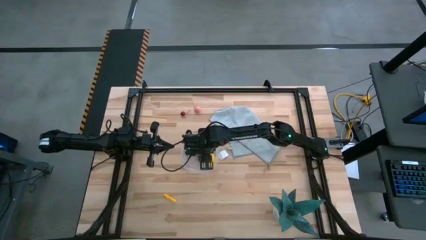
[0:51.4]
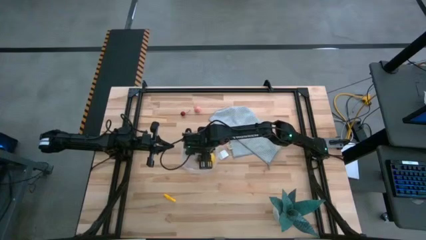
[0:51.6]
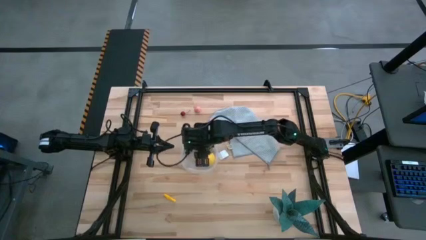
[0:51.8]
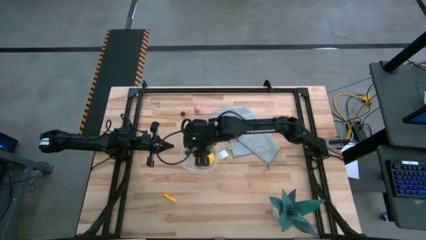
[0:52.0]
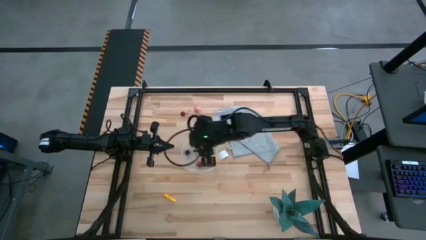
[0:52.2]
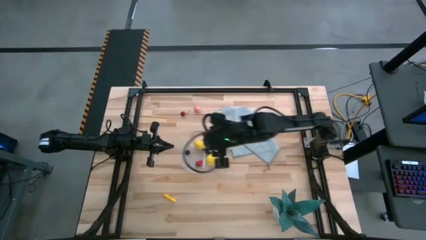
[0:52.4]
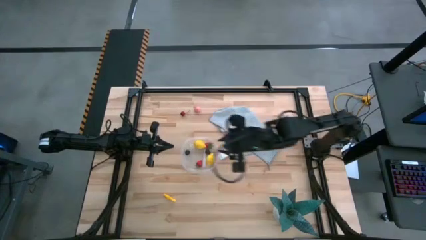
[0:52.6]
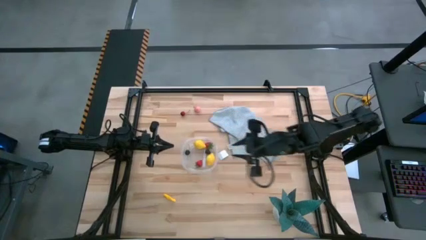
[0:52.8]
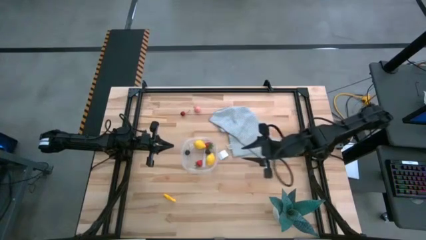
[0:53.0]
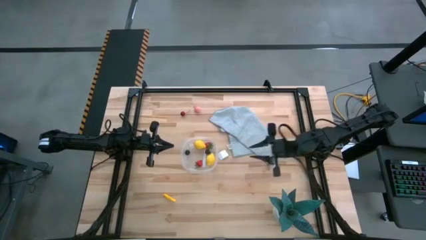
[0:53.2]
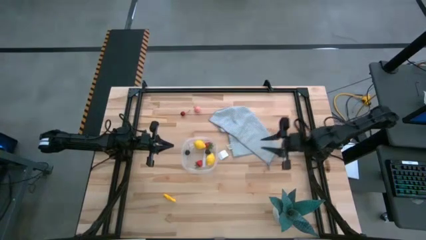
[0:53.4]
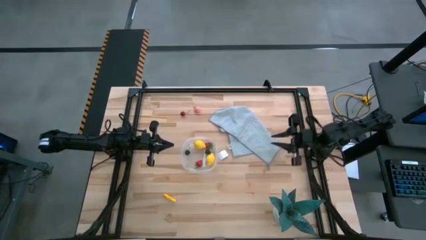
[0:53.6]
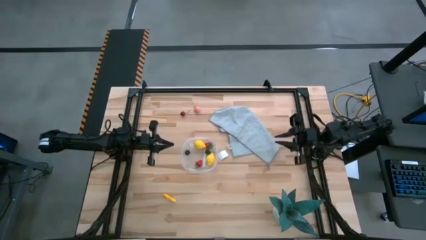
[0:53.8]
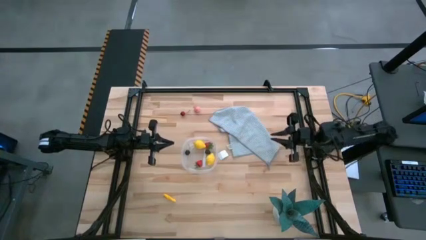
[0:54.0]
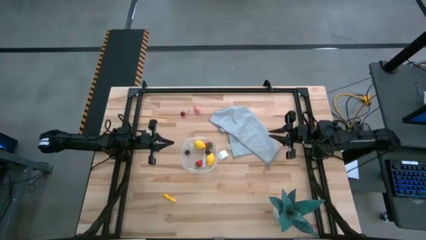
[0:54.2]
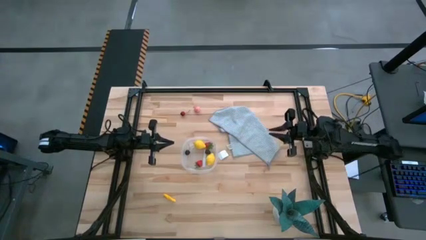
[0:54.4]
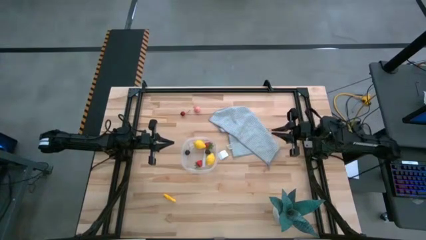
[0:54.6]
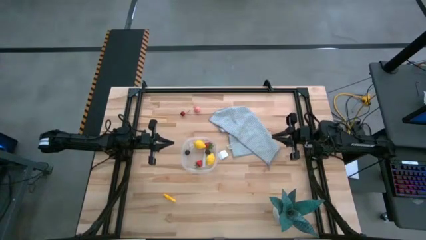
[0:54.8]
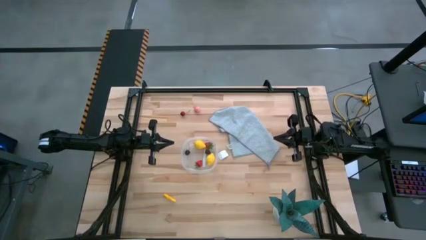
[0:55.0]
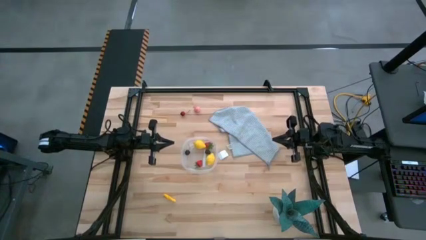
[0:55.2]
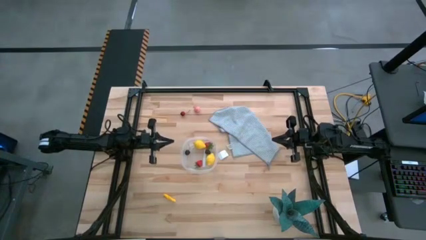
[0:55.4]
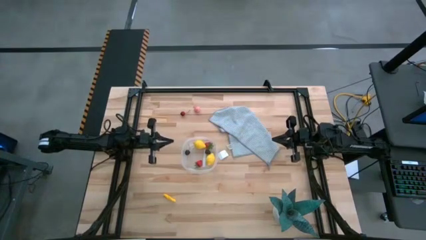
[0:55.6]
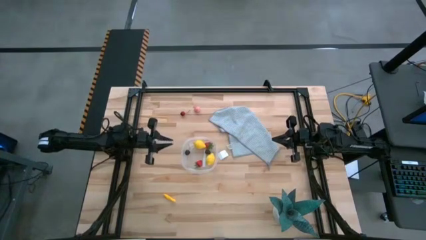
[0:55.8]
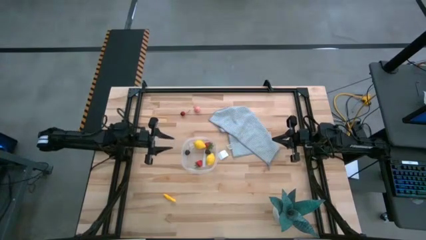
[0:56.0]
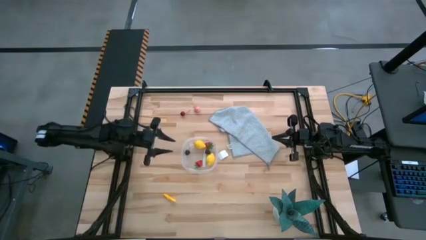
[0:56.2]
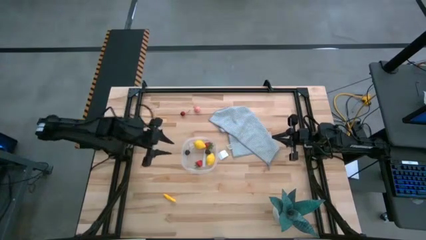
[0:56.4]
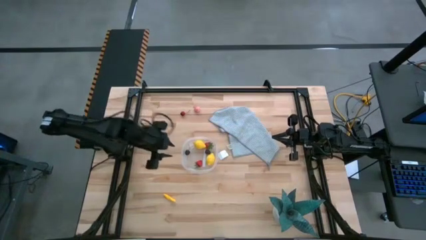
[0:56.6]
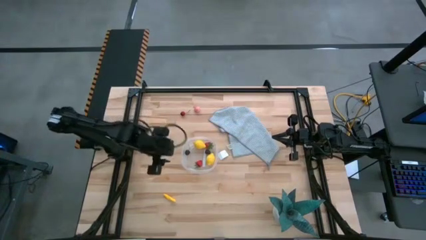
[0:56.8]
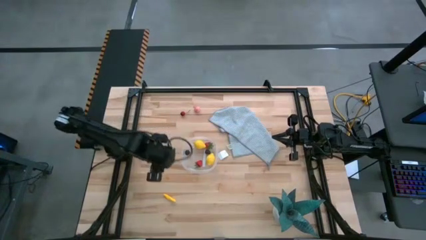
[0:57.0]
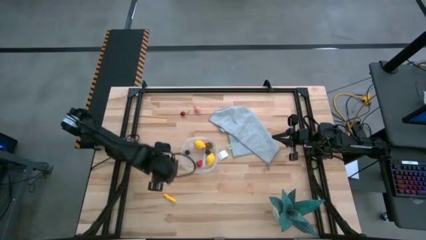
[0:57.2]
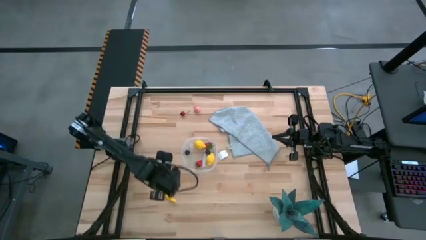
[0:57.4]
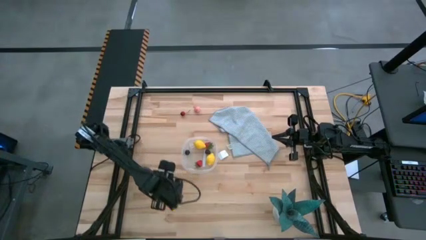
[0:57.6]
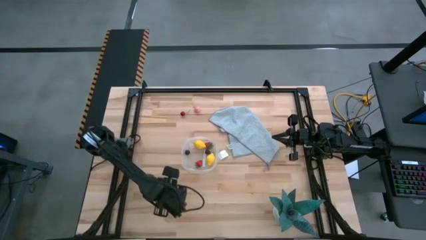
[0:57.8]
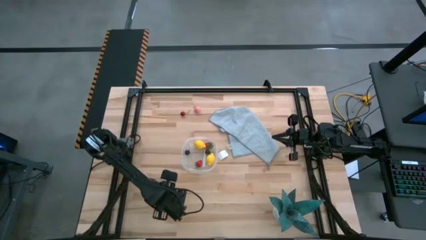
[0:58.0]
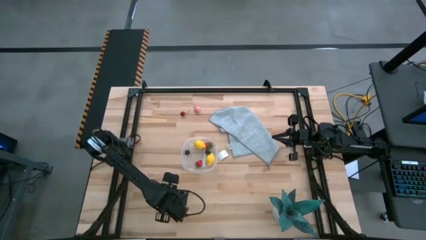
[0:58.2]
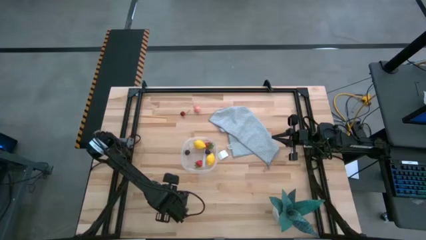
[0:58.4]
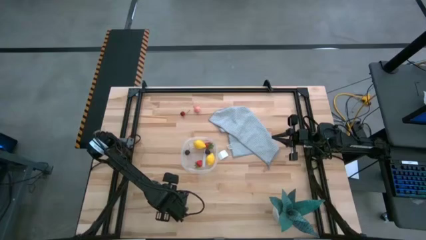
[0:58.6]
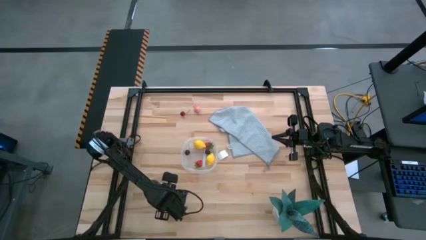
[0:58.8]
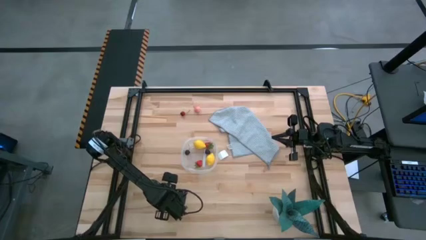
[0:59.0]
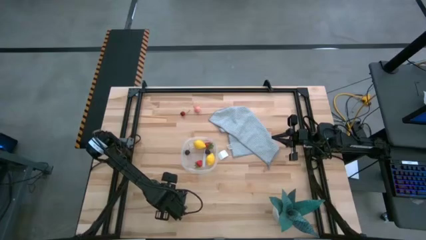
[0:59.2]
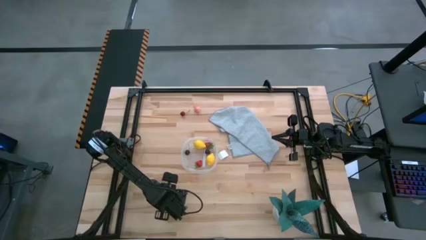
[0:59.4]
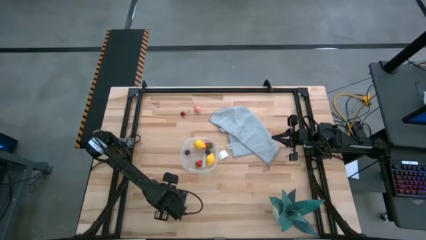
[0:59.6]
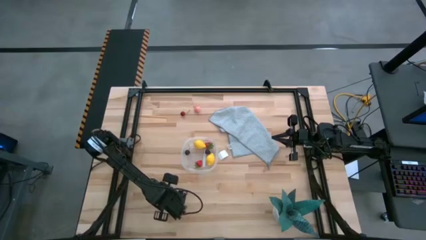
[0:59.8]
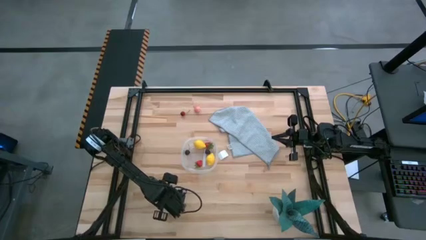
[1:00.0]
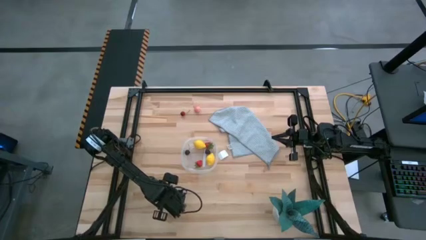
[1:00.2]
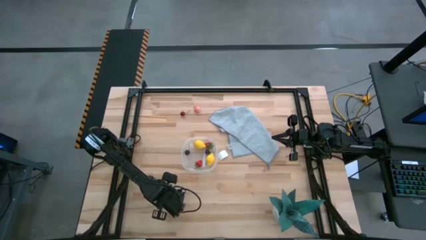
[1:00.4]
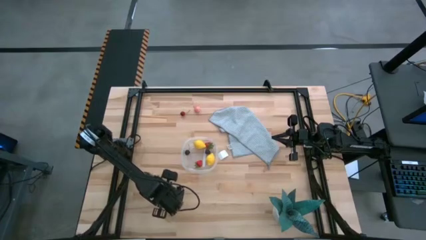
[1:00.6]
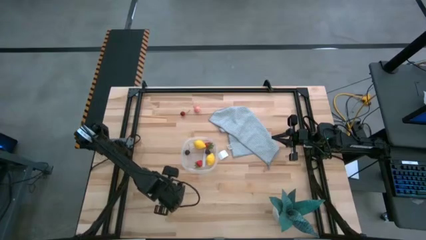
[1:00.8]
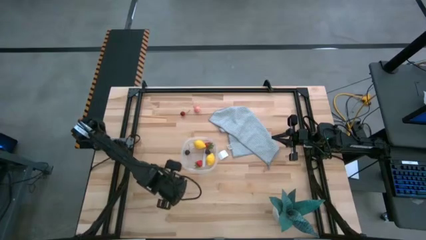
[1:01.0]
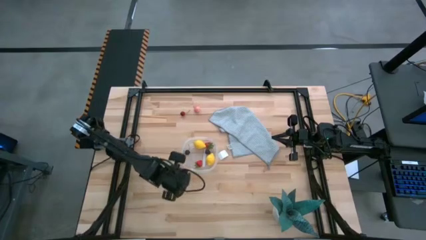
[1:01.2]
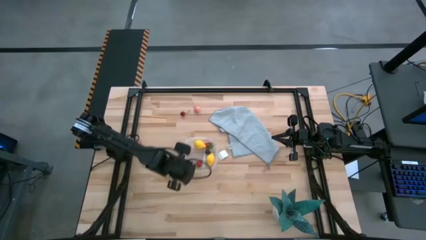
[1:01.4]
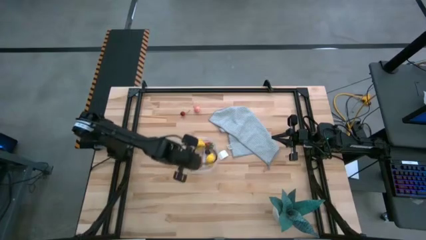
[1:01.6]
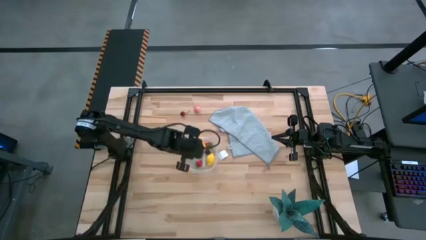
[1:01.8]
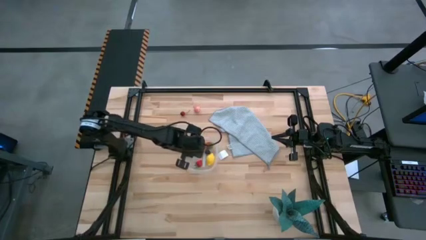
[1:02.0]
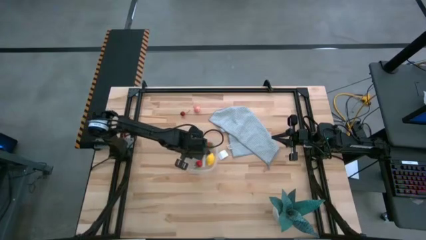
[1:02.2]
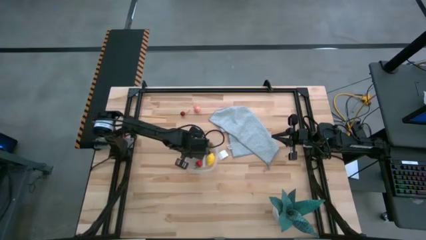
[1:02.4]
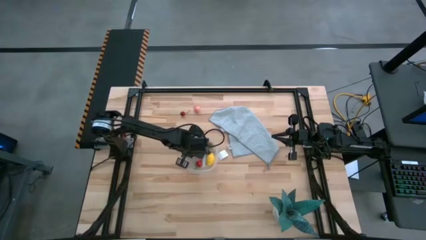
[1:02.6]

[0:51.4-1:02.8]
Task: Pick and placing Produce into tupperware
Put the yellow corn into the transparent bin
